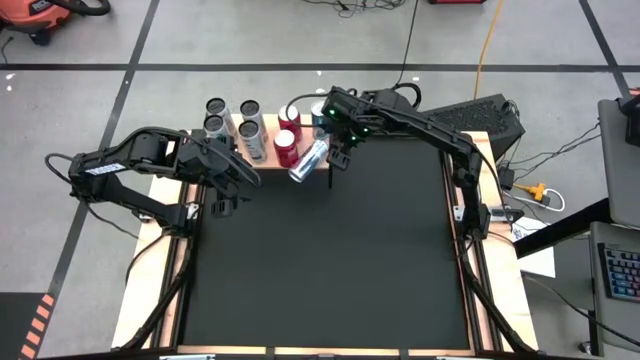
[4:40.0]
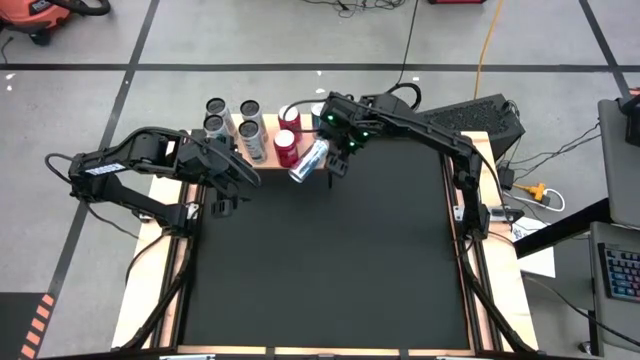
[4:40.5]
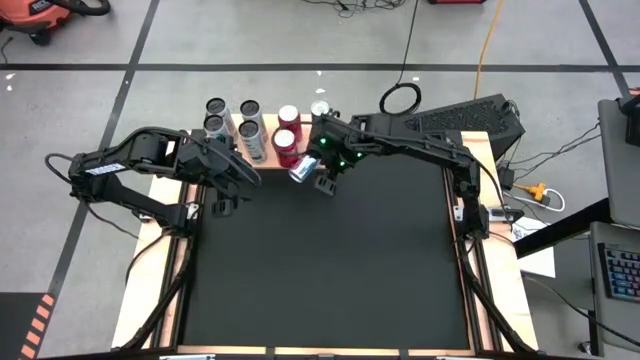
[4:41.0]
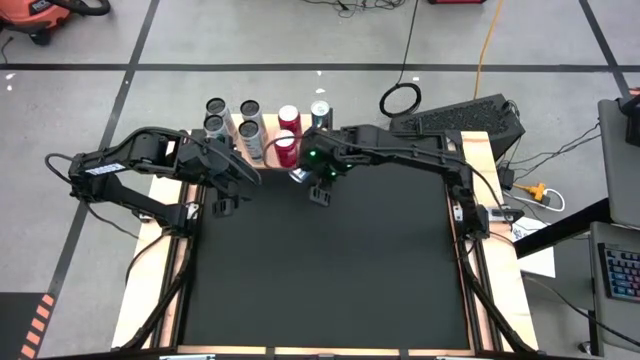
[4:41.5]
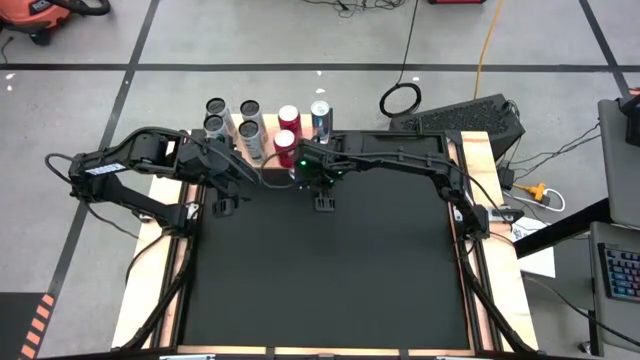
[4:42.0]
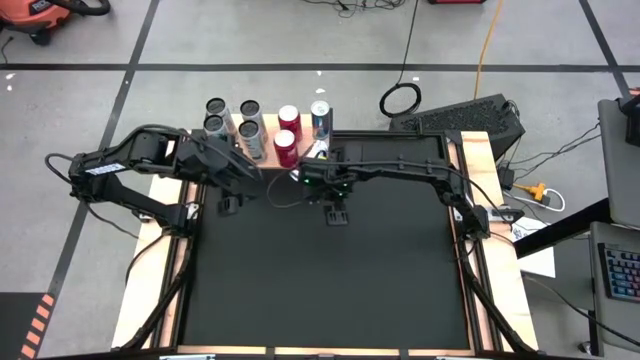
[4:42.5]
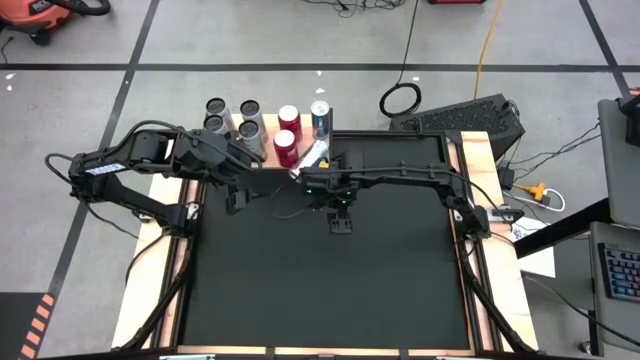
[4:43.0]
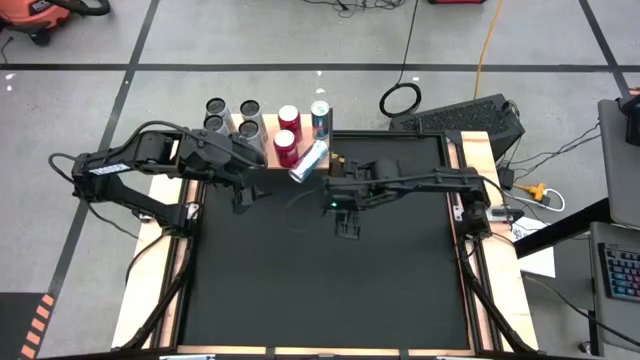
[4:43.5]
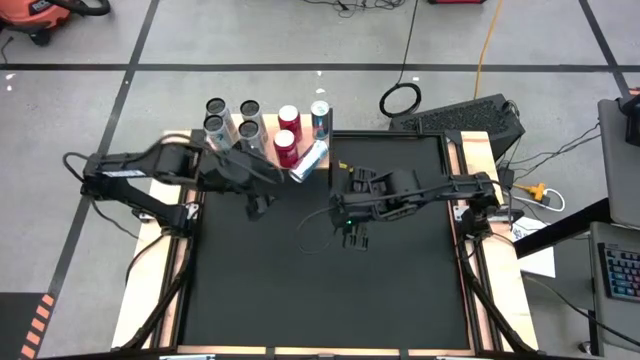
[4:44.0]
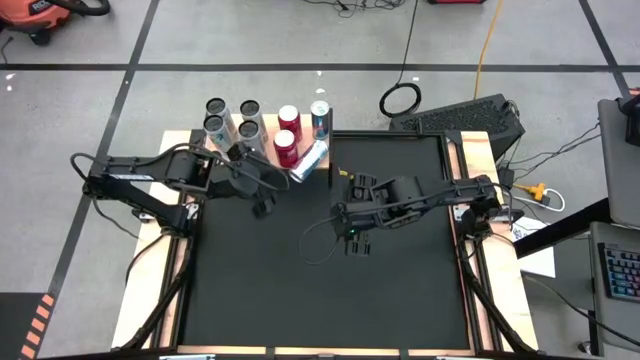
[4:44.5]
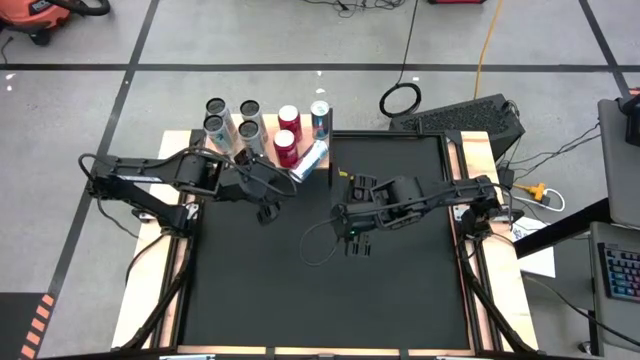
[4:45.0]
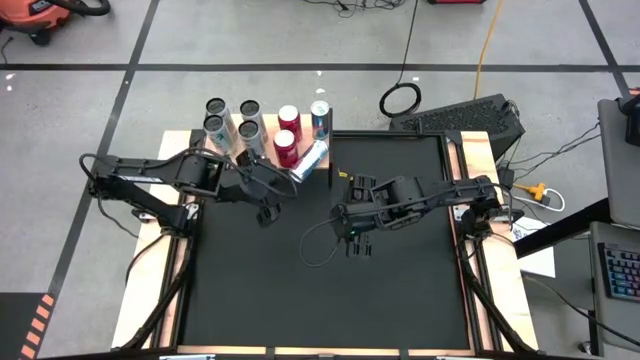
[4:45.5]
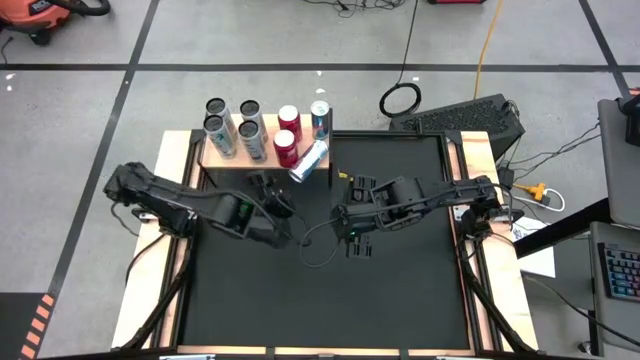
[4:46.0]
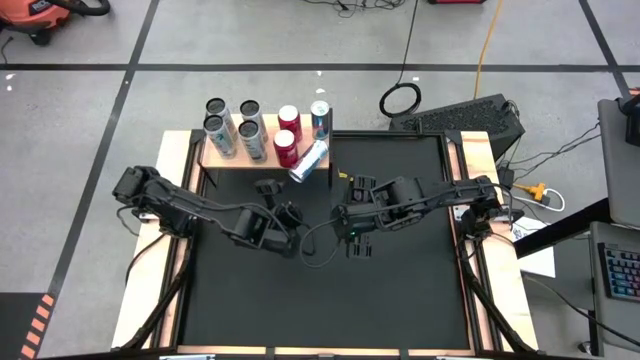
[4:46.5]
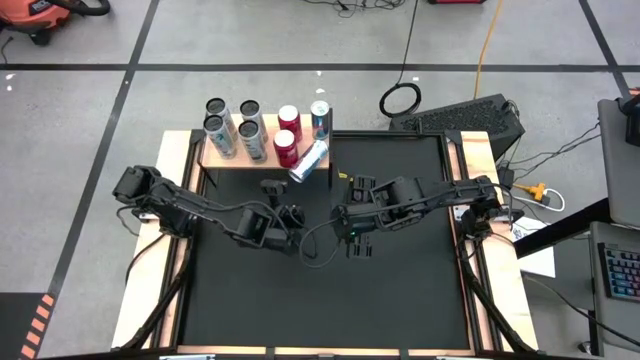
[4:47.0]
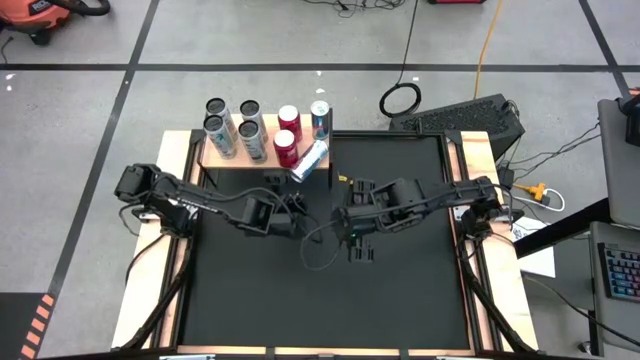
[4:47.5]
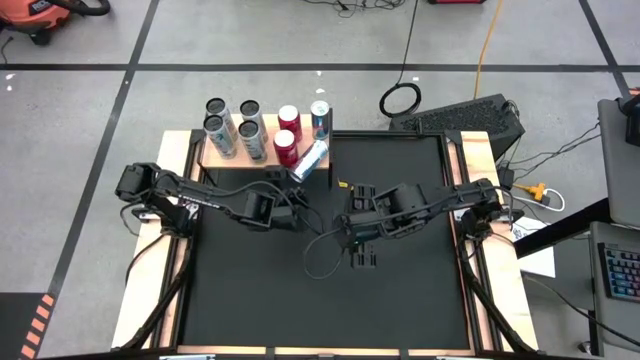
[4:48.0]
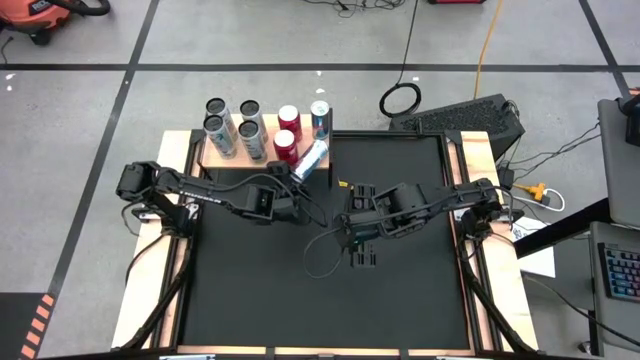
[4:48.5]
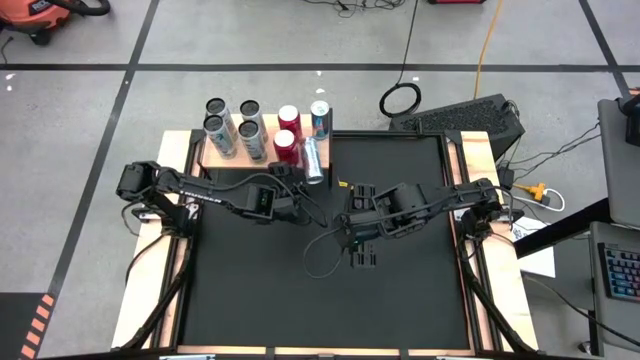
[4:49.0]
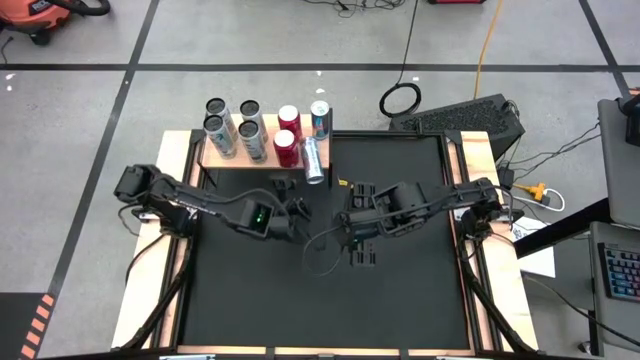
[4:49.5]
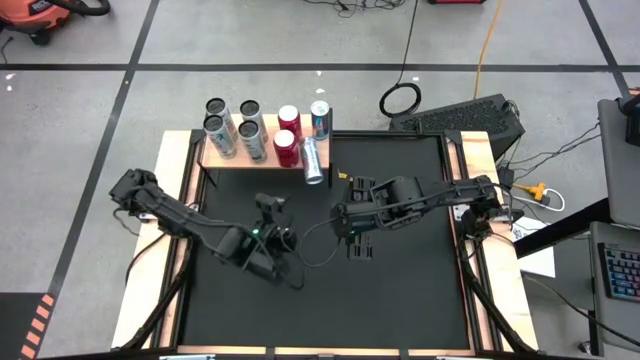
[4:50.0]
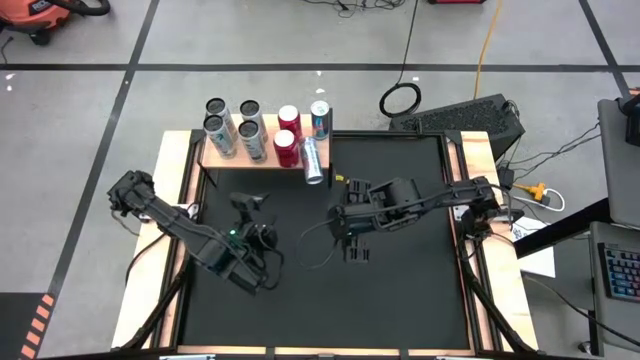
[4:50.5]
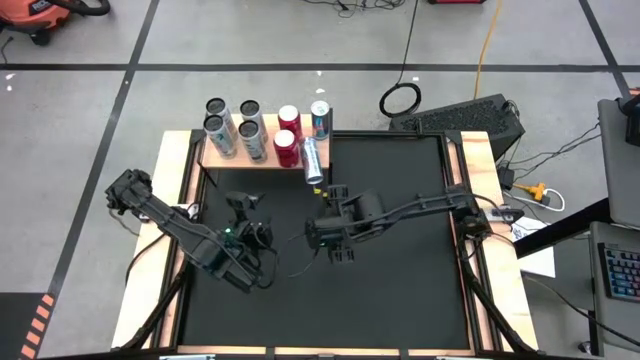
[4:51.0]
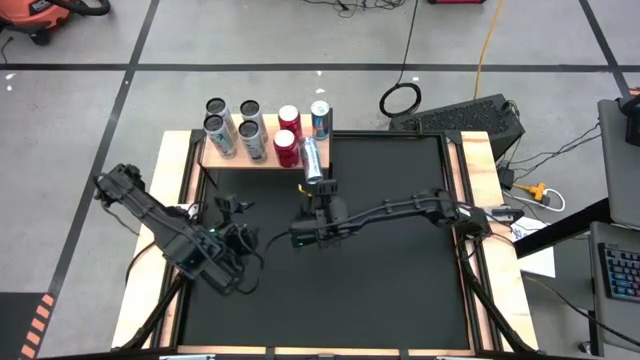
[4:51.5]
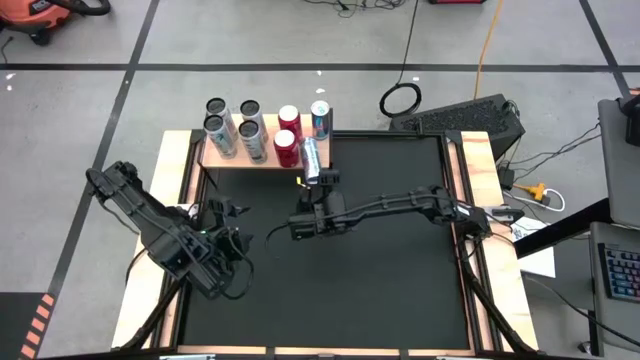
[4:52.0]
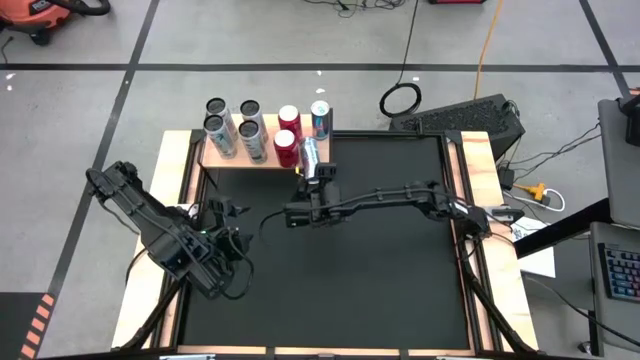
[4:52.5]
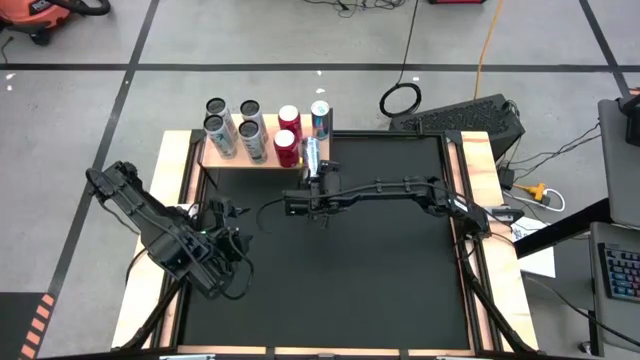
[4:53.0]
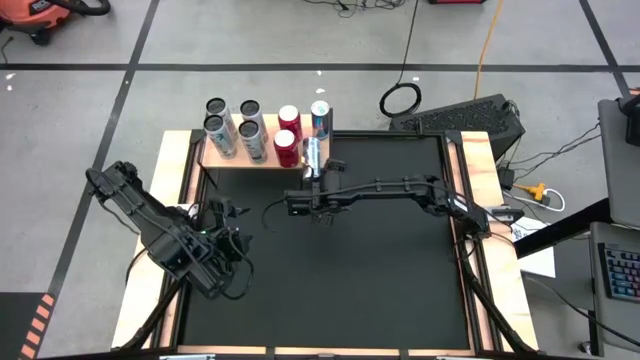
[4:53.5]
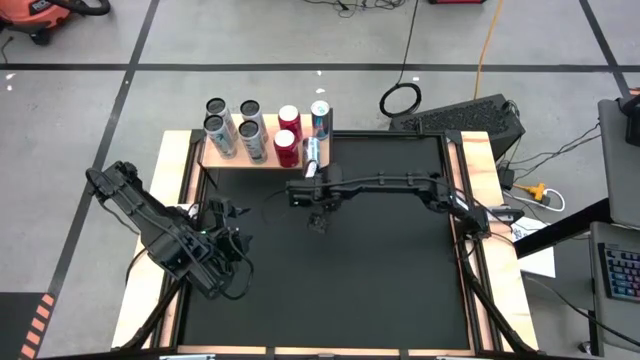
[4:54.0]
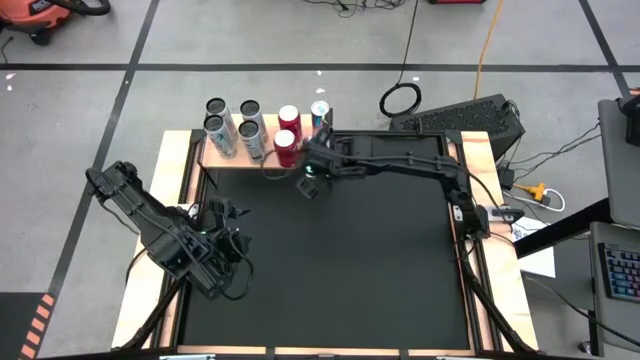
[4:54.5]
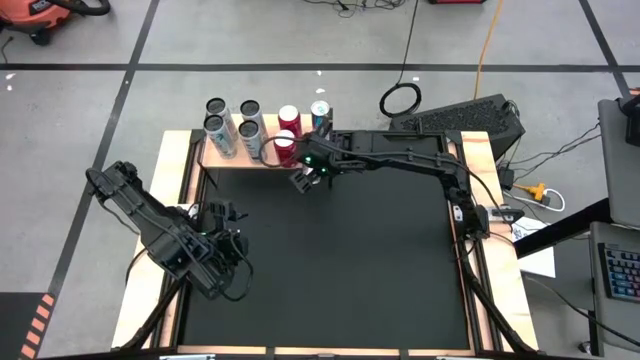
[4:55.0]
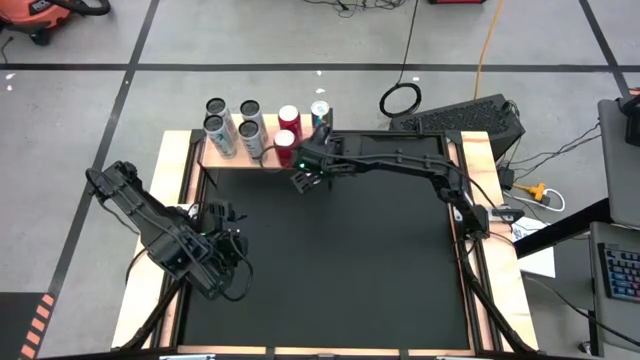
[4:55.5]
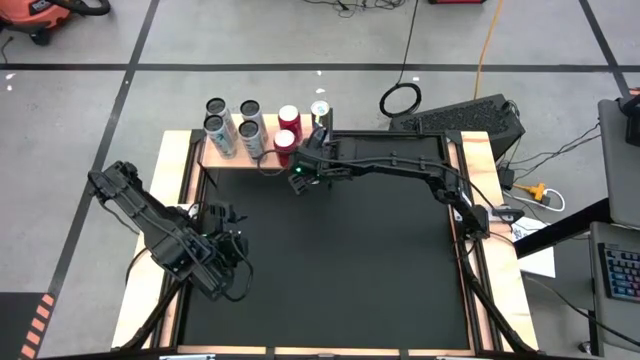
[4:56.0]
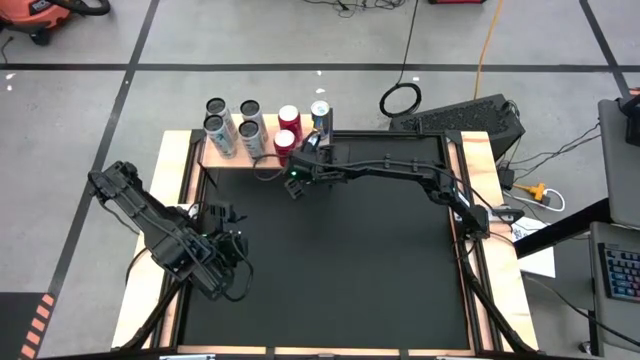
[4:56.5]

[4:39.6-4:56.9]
Task: Place canned beverage on shelf
Put the blue soda can aligned with the blue soda can on the shelf

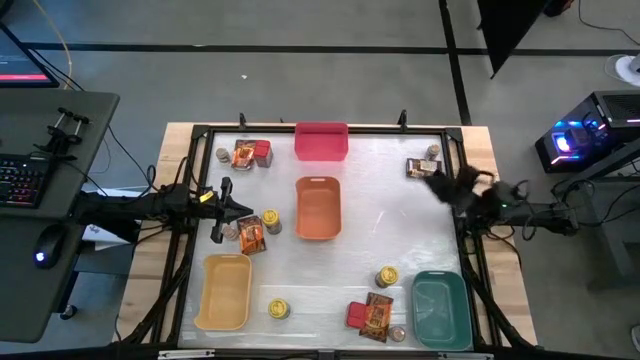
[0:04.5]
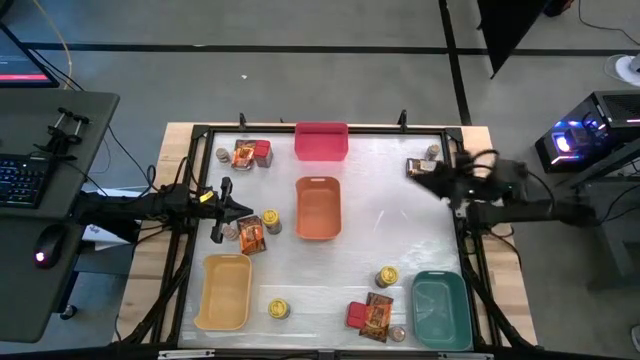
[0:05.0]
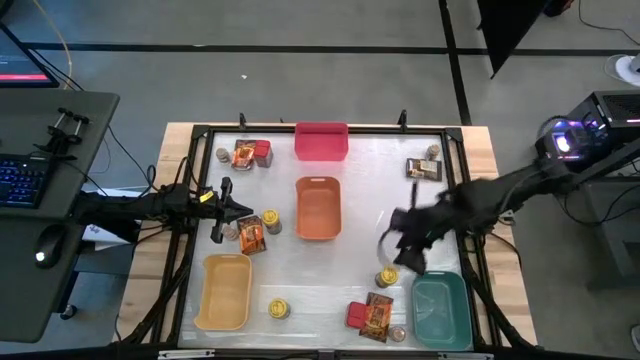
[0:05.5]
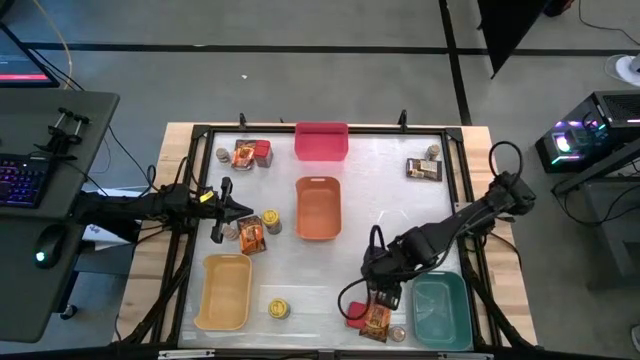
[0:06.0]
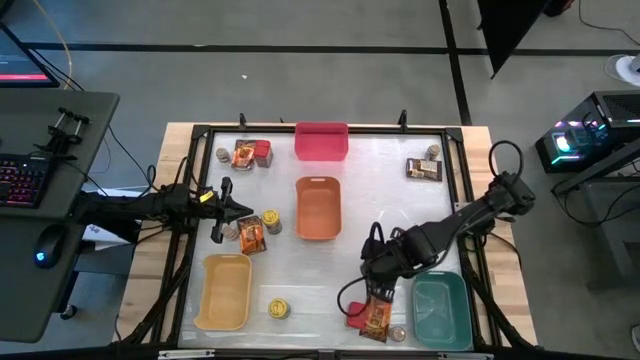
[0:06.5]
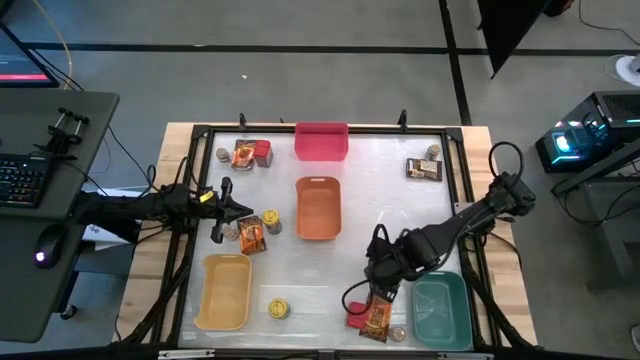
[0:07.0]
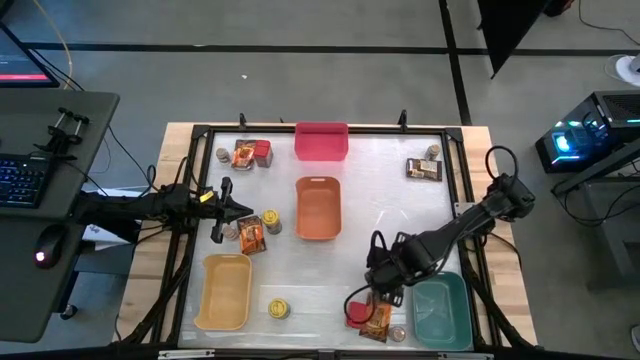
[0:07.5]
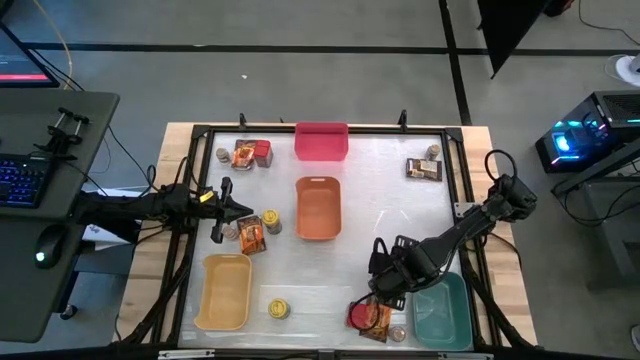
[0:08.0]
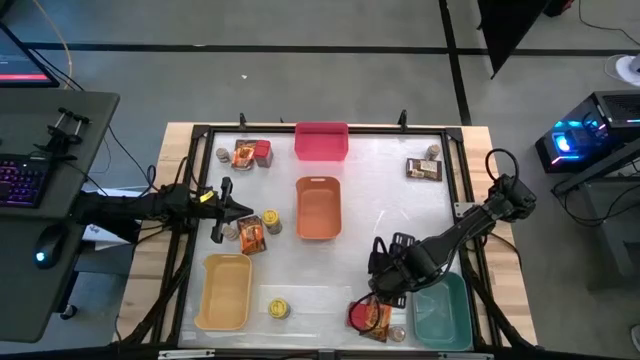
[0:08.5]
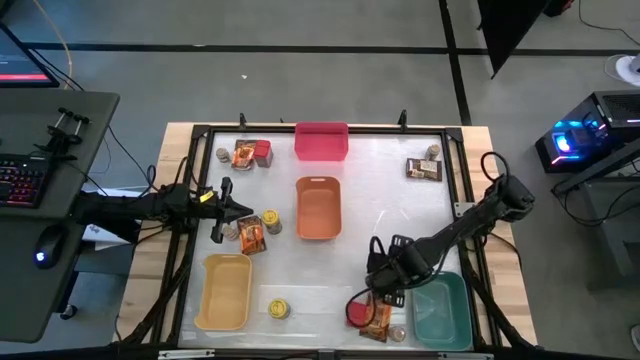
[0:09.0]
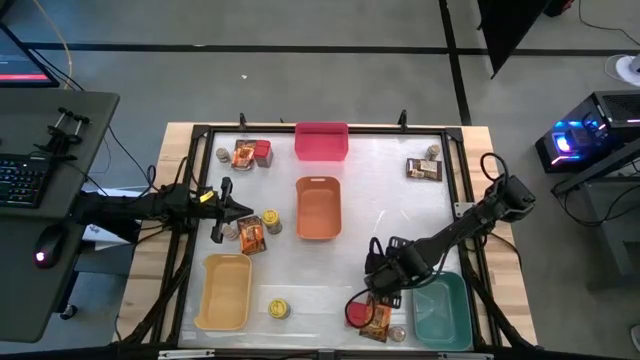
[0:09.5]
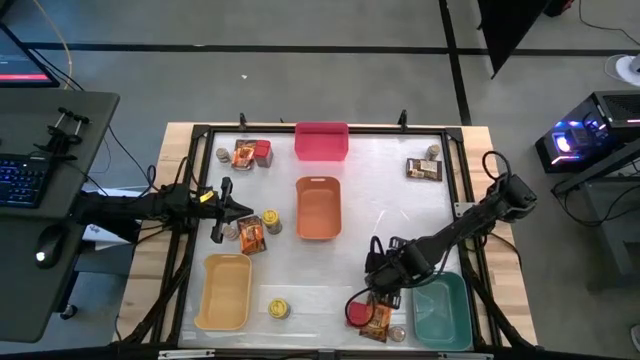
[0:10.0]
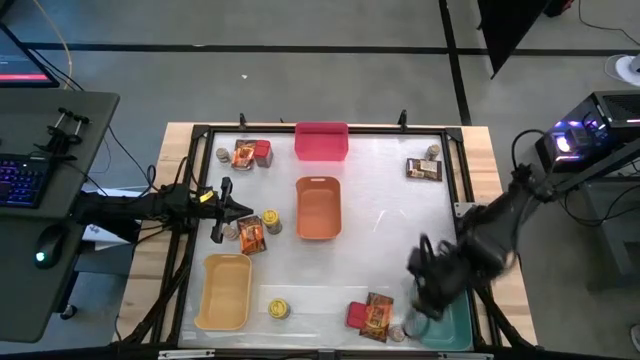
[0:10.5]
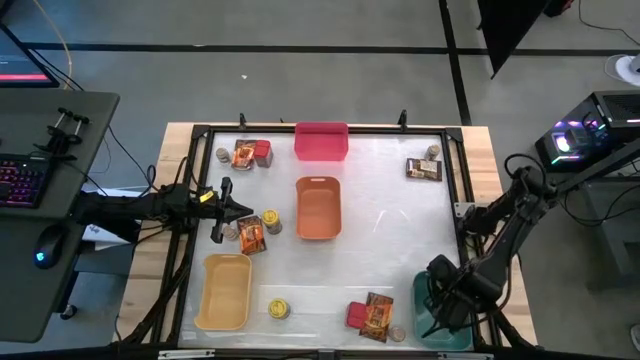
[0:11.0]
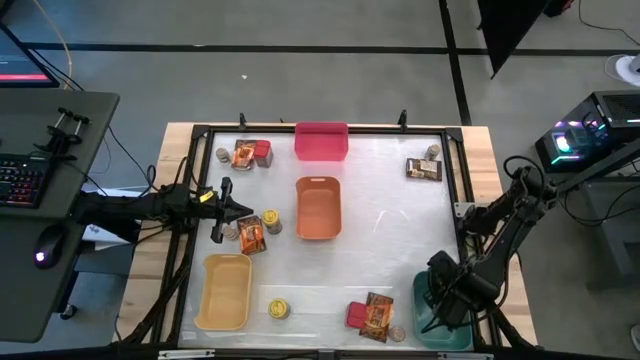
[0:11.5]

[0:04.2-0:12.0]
Task: Sort spices by type
Put the middle right yellow spice bottle into the green bin
